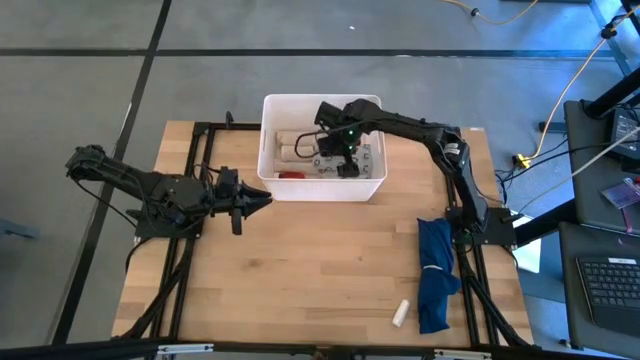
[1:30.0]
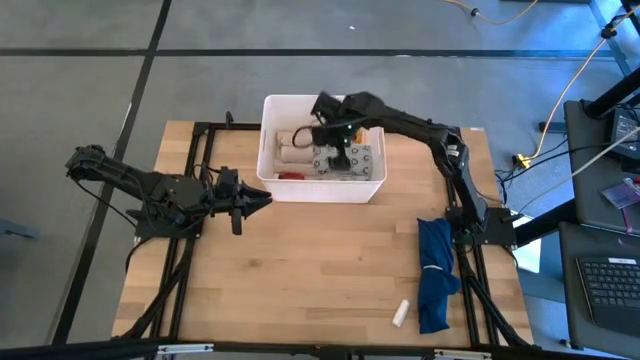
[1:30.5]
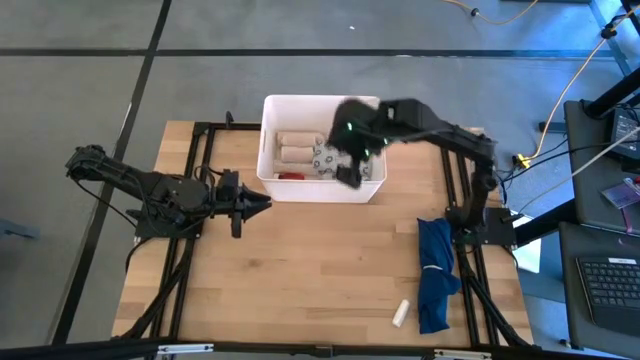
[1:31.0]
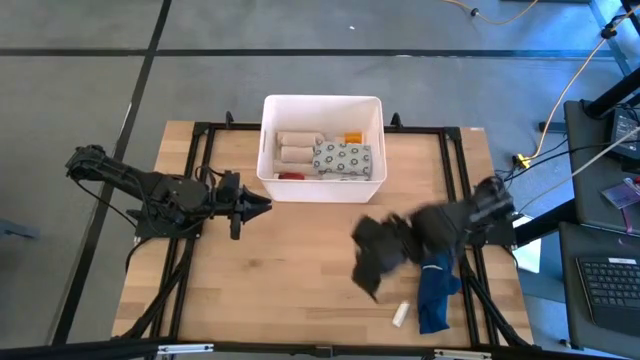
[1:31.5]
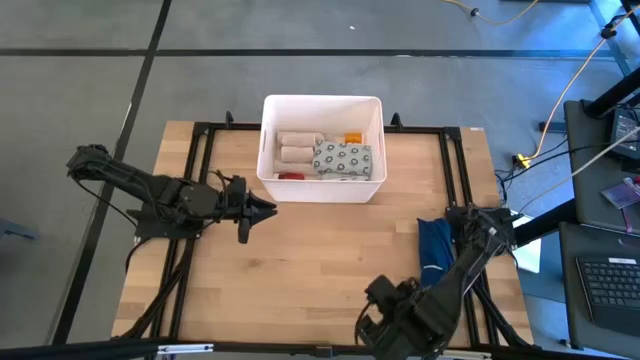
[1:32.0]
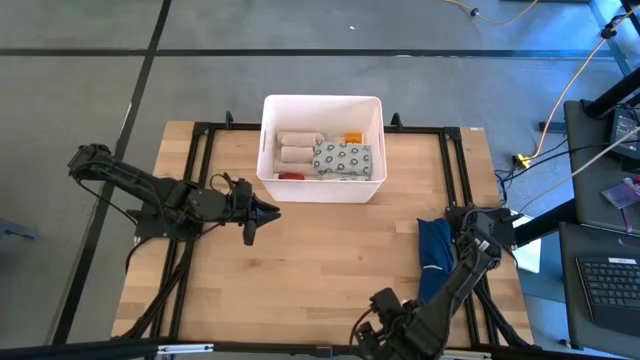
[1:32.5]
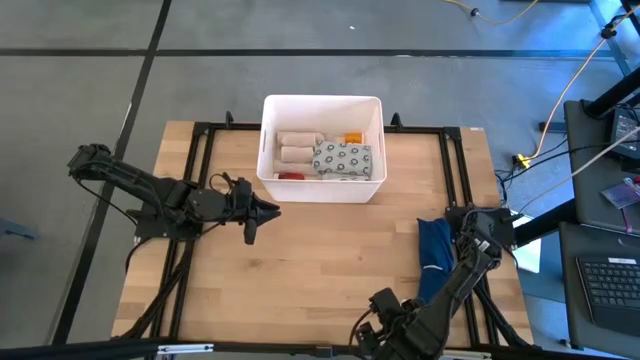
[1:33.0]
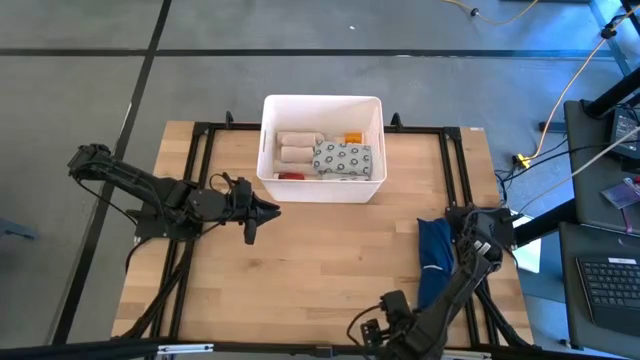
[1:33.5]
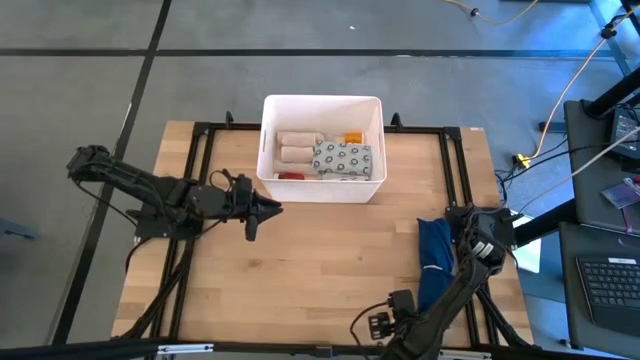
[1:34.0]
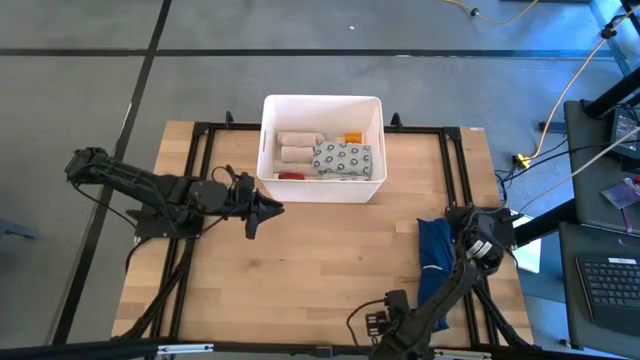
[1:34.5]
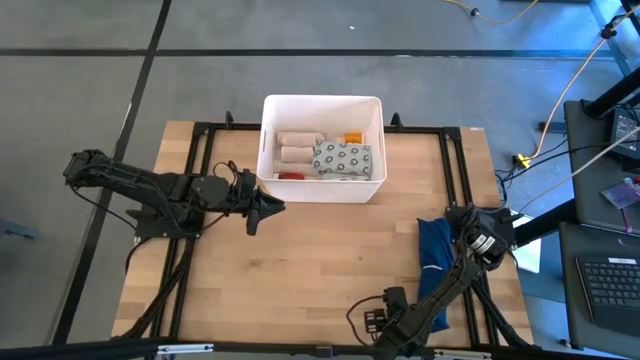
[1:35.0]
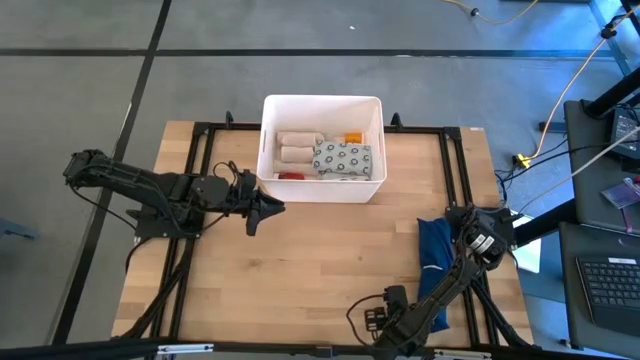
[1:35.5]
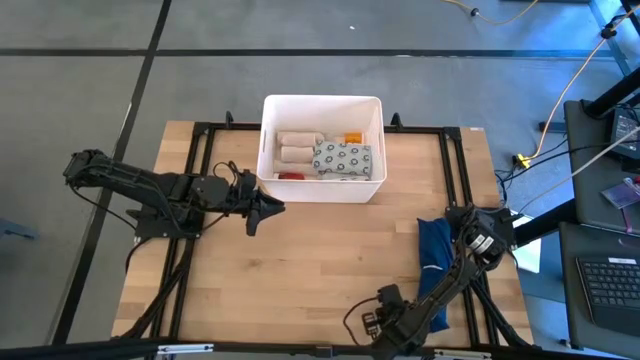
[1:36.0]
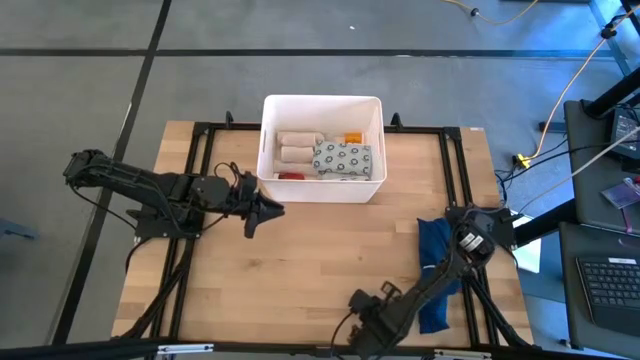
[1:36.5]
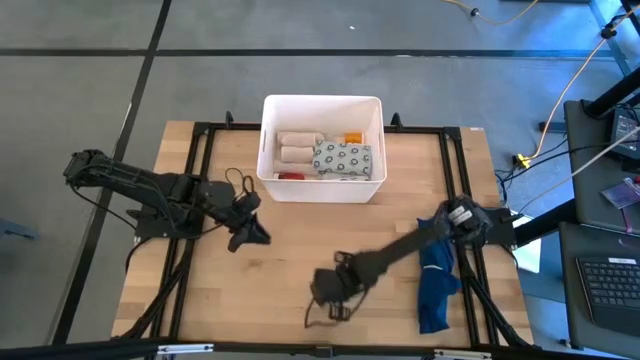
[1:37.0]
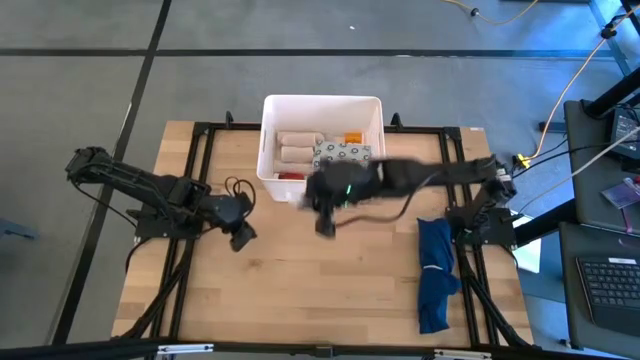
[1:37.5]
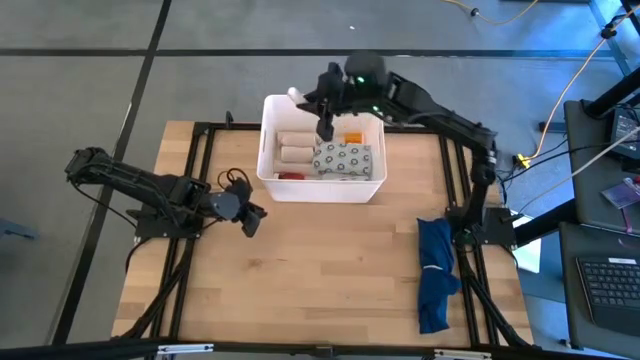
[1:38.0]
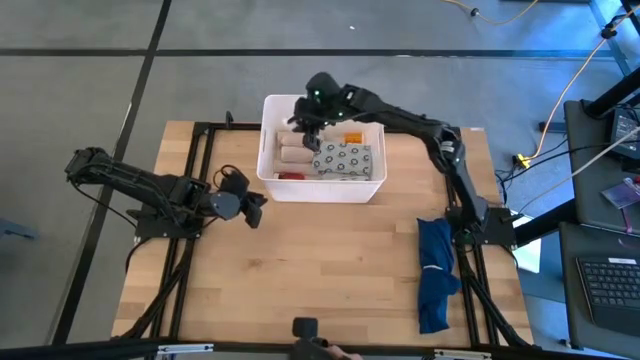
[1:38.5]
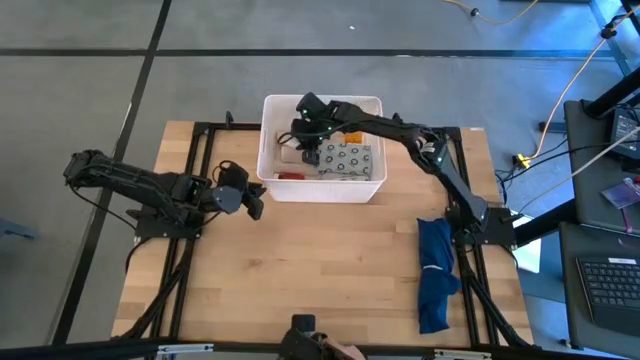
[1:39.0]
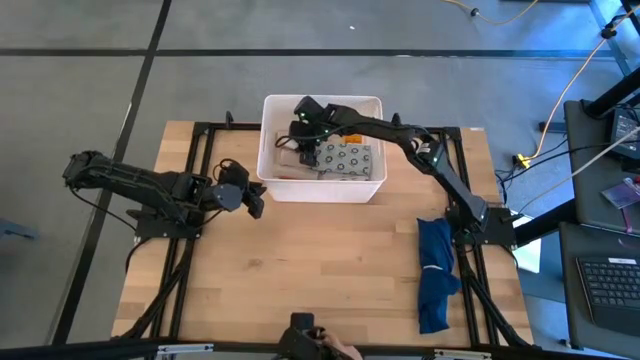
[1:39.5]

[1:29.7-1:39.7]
Task: Pick & place medical supplies in basket/bin
Put the white rolled gauze into the white bin

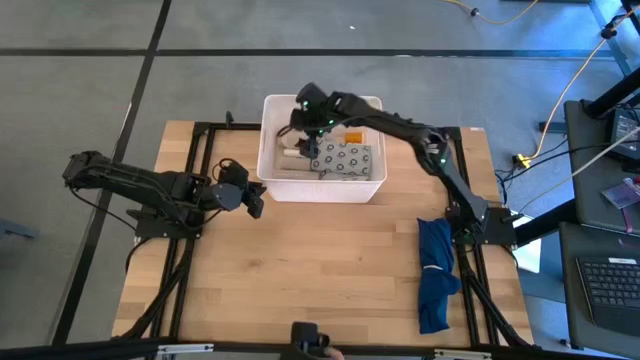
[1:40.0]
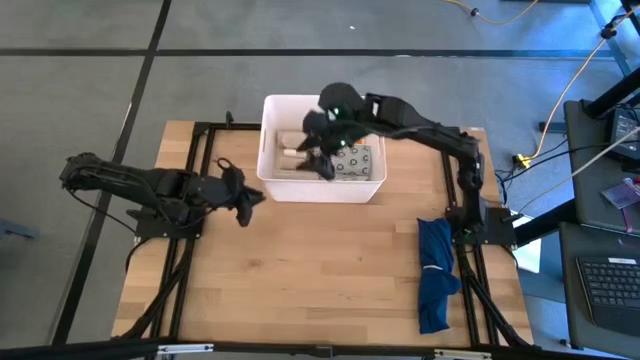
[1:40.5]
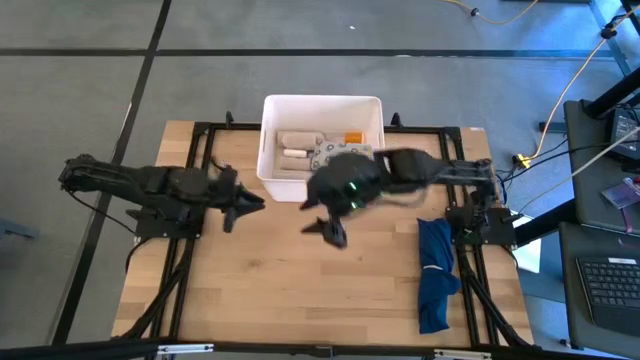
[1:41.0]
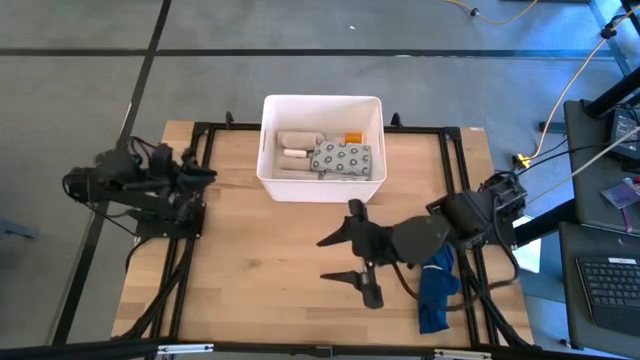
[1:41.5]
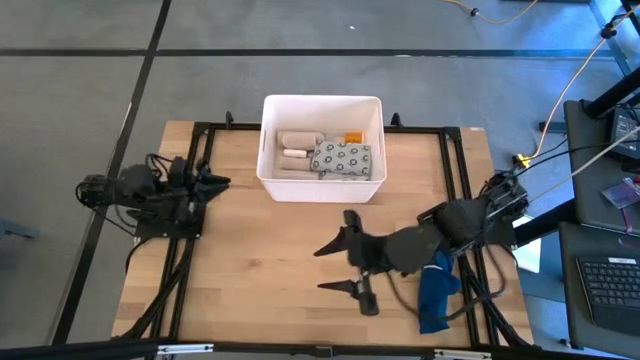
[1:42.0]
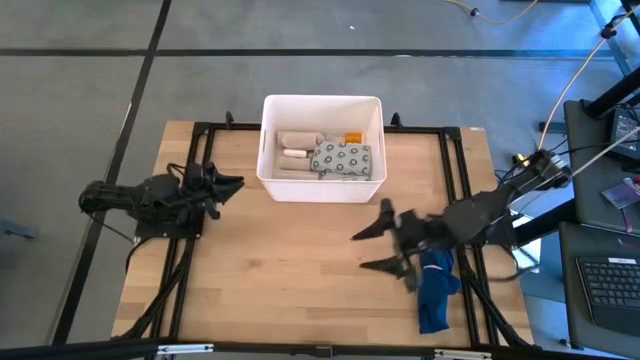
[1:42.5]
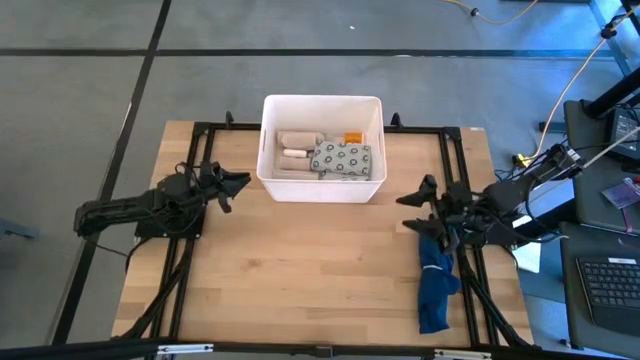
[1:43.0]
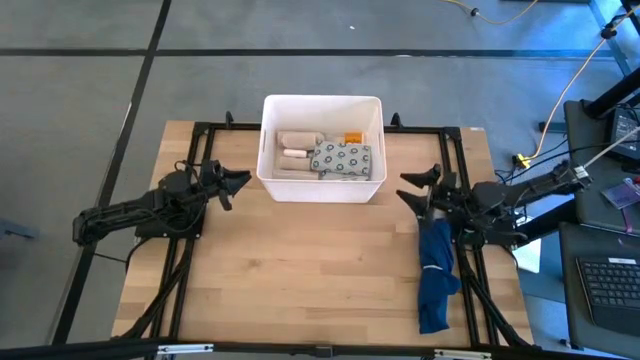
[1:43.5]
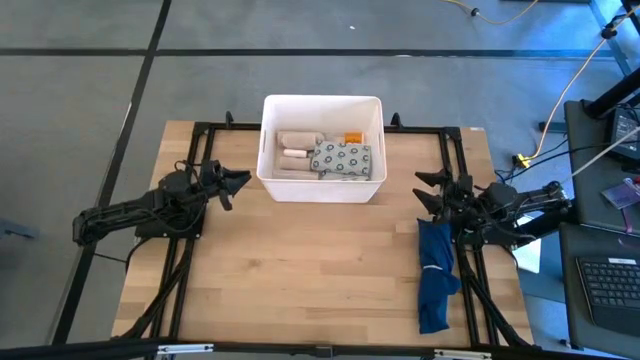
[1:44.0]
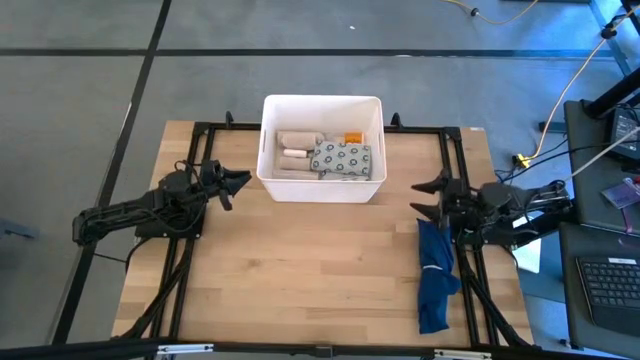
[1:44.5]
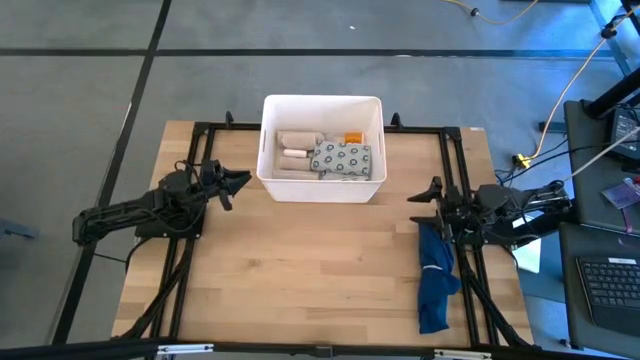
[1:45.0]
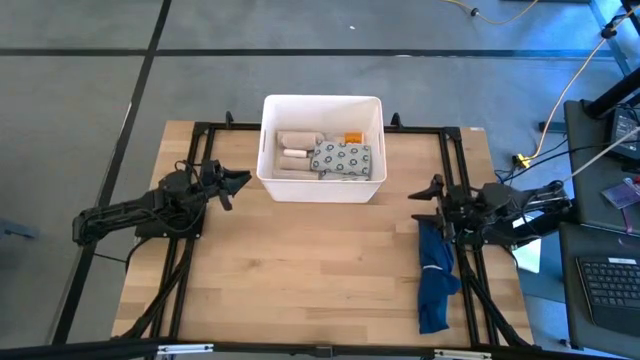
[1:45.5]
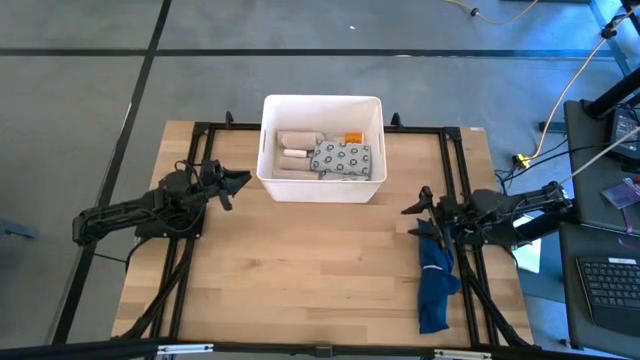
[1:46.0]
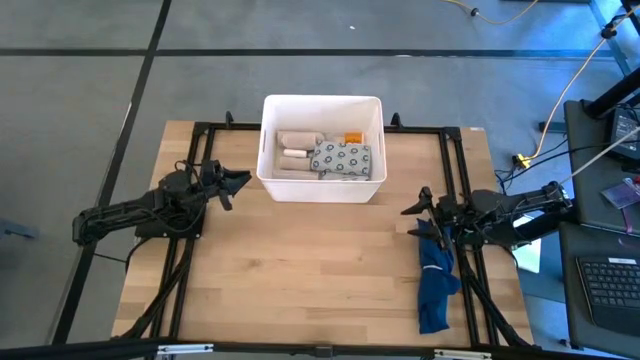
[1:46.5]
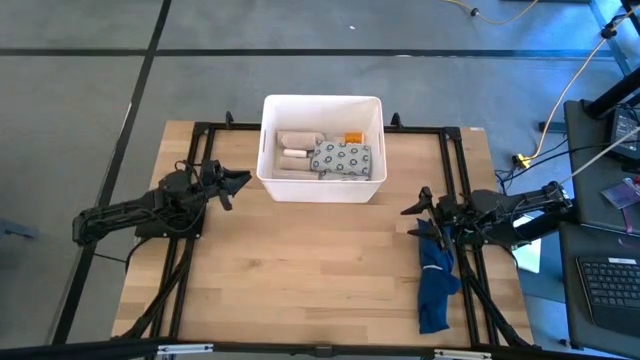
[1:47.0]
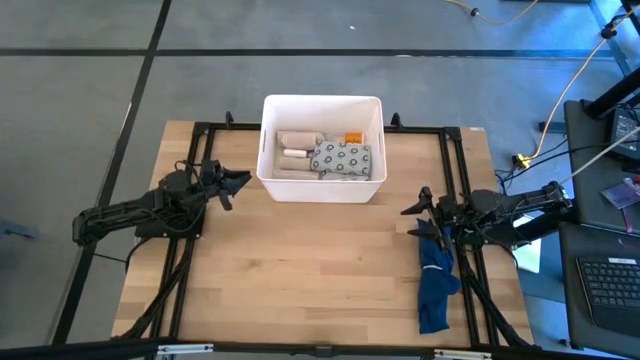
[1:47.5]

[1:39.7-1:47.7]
Return to Home Position

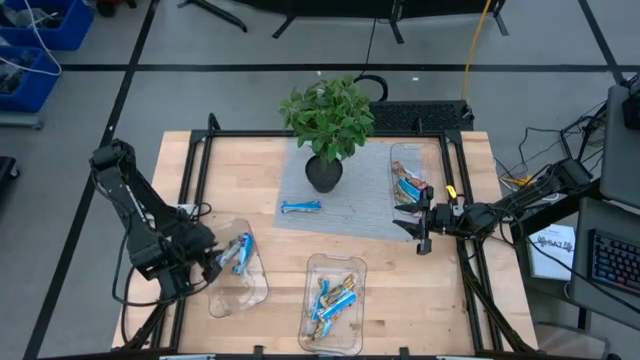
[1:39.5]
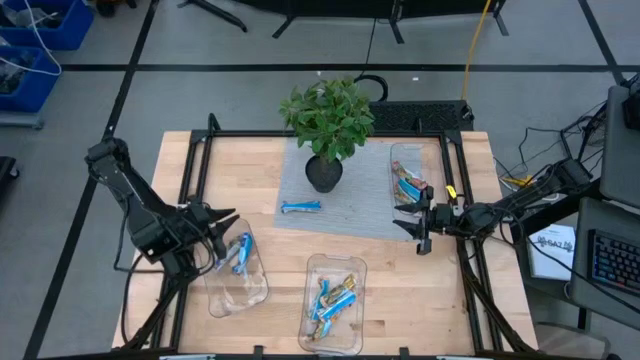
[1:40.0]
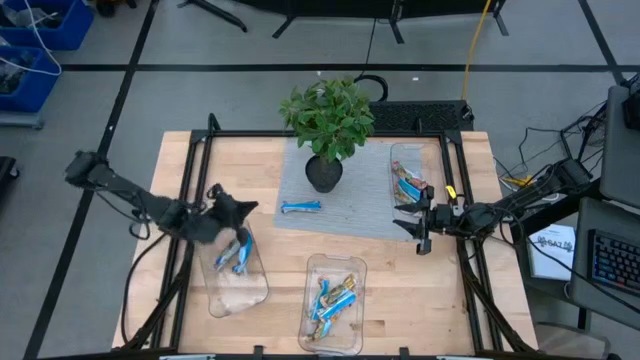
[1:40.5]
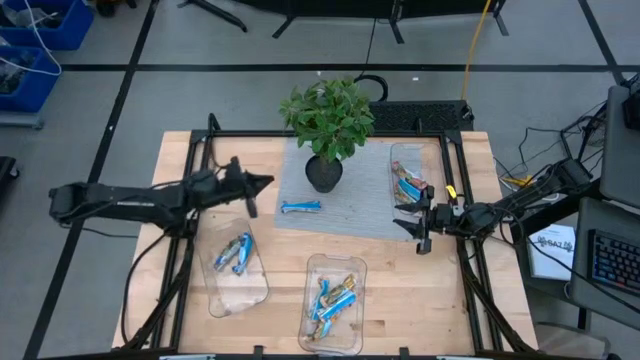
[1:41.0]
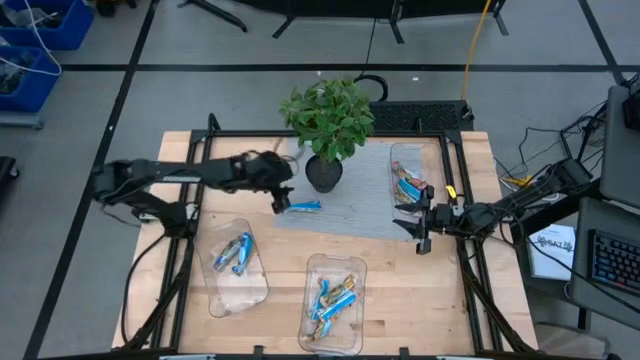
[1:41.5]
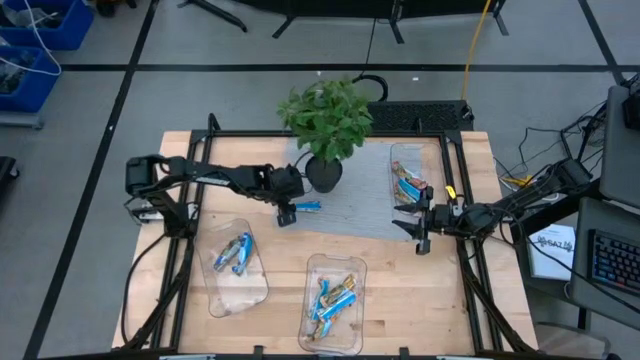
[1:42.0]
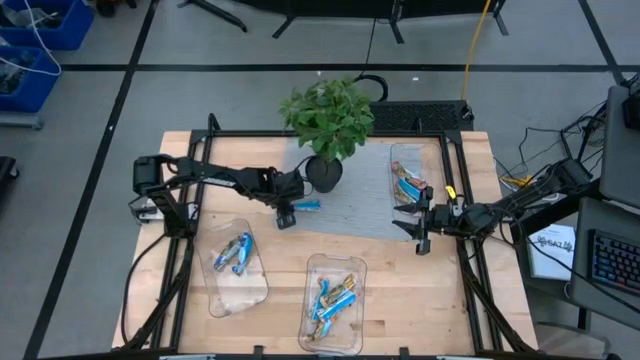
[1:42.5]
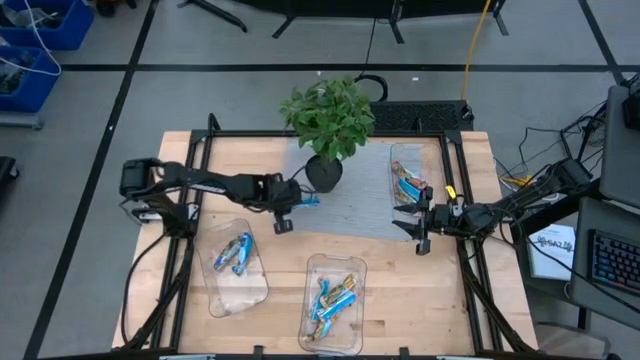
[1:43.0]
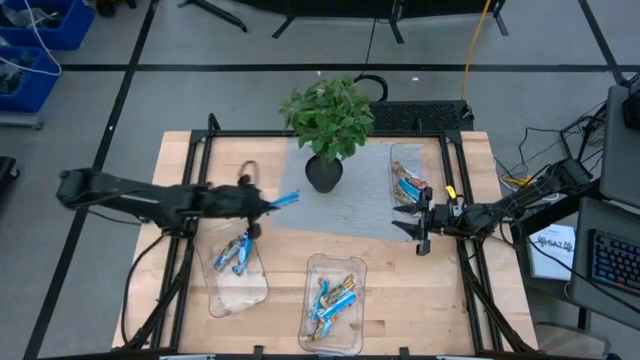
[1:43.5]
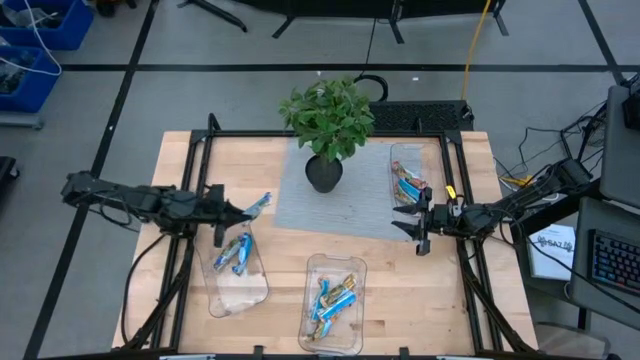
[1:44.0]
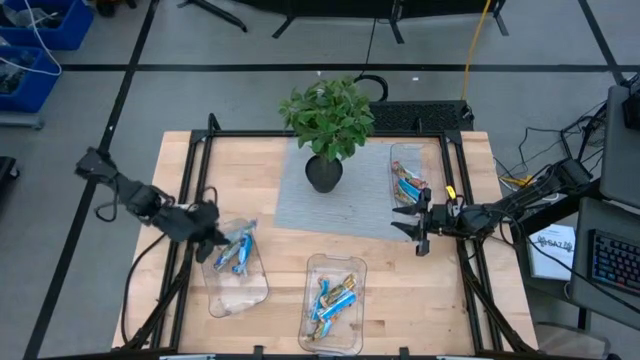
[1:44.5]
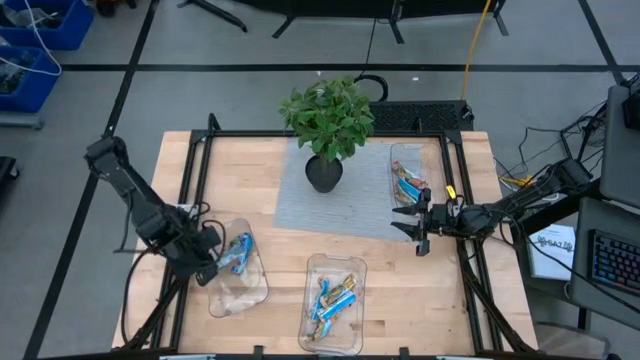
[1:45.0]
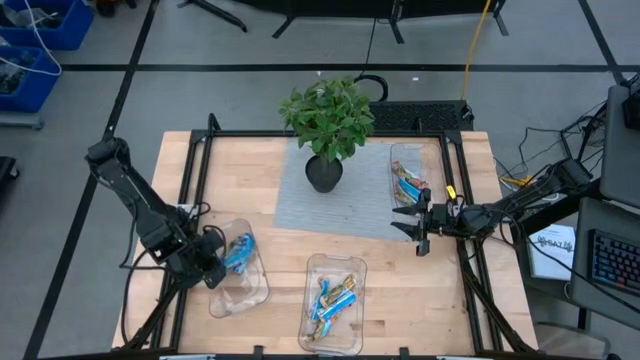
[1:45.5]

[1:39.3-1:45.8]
Task: Pick and place Granola Bars by type
Put the blue granola bar into the left transparent bin
